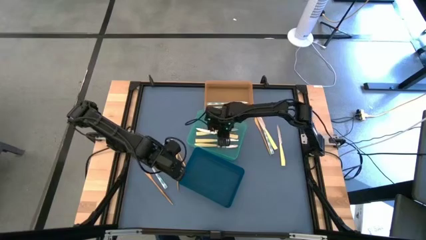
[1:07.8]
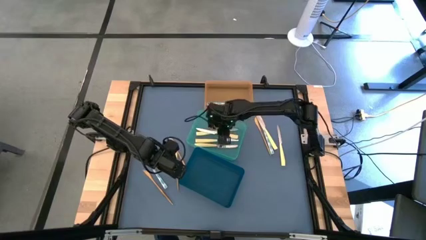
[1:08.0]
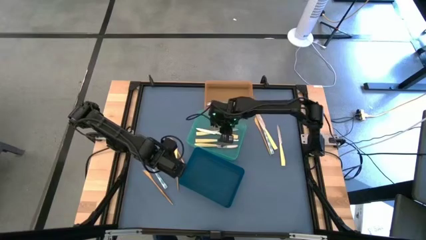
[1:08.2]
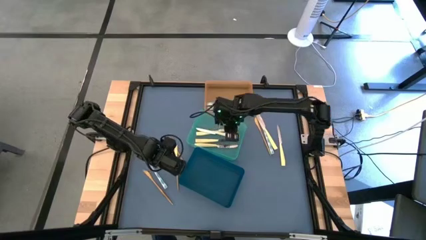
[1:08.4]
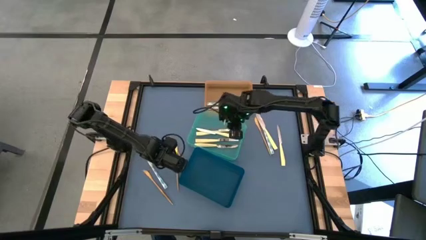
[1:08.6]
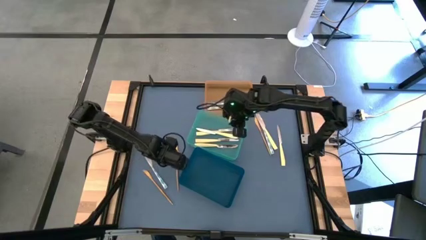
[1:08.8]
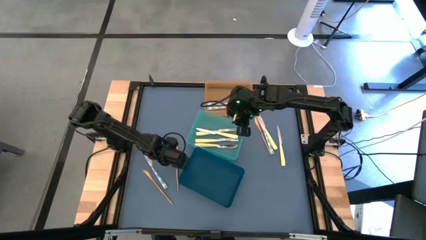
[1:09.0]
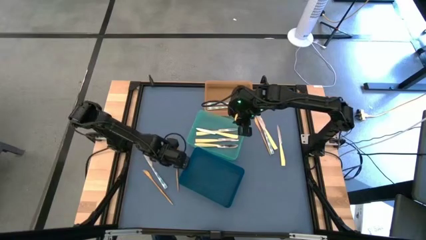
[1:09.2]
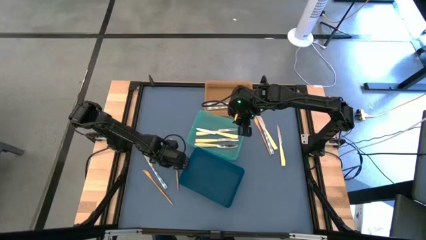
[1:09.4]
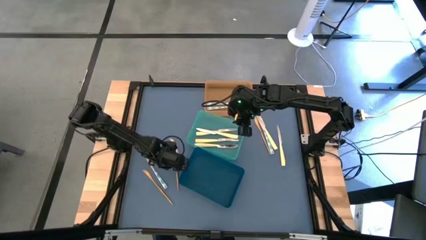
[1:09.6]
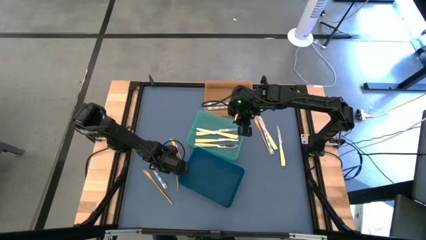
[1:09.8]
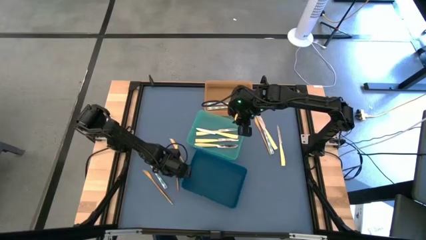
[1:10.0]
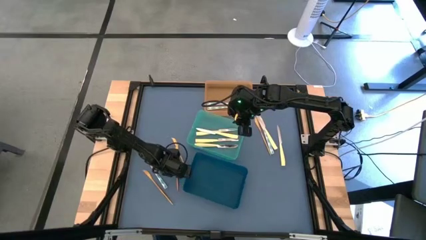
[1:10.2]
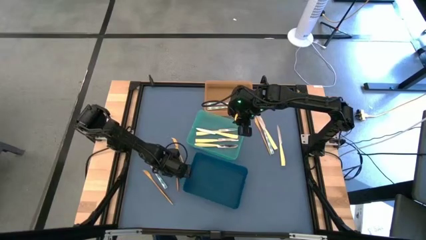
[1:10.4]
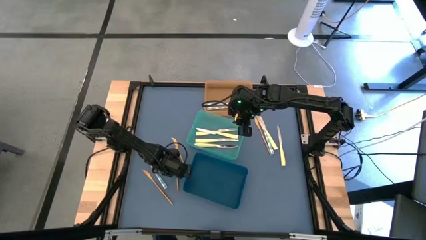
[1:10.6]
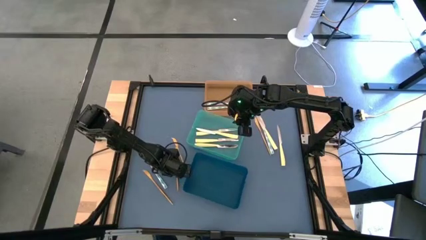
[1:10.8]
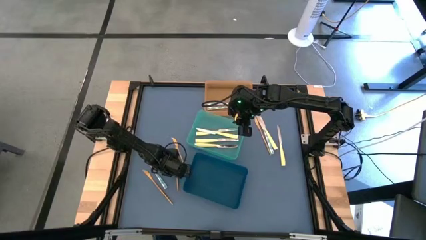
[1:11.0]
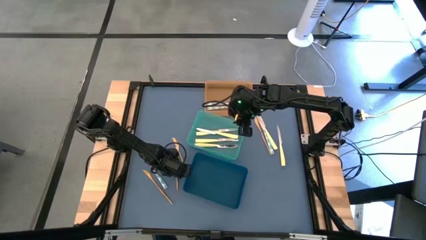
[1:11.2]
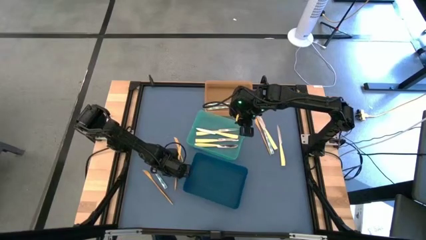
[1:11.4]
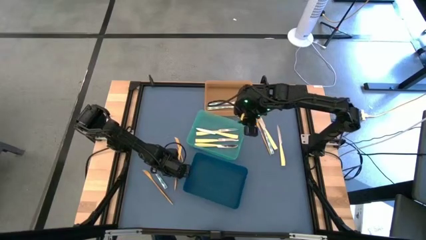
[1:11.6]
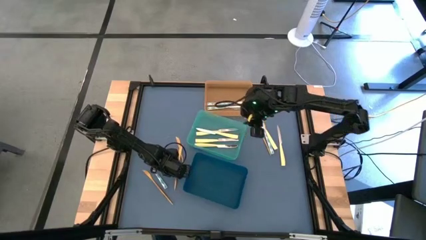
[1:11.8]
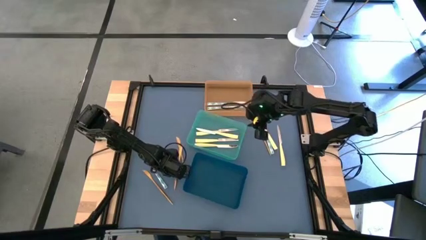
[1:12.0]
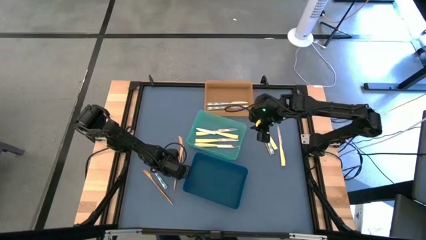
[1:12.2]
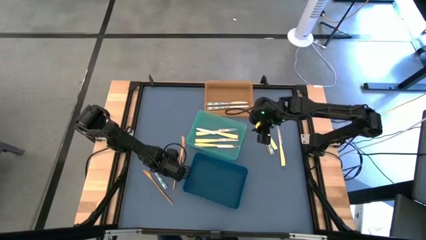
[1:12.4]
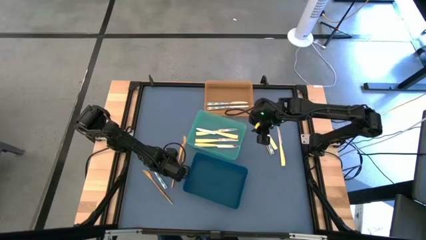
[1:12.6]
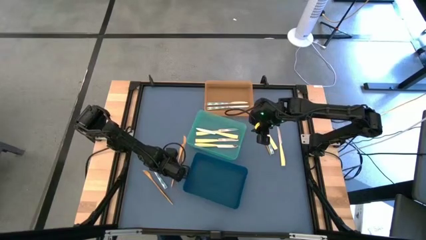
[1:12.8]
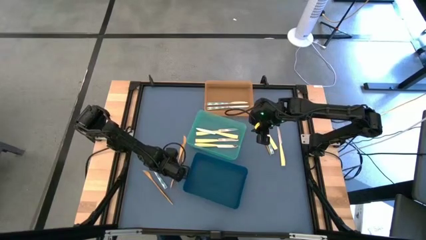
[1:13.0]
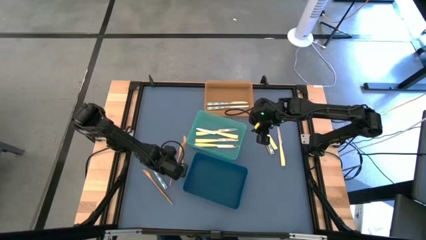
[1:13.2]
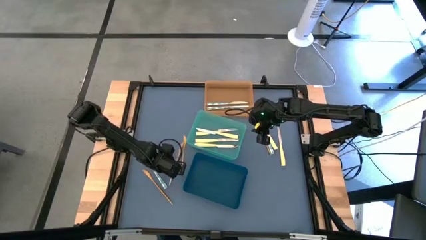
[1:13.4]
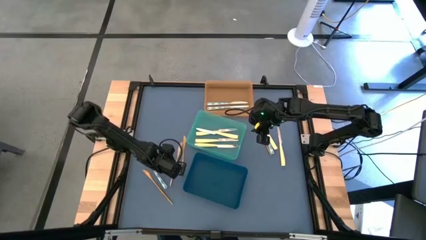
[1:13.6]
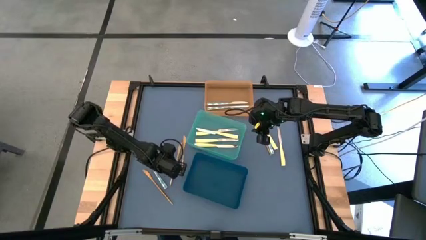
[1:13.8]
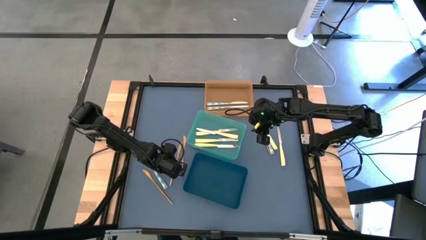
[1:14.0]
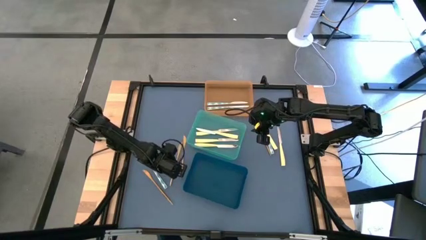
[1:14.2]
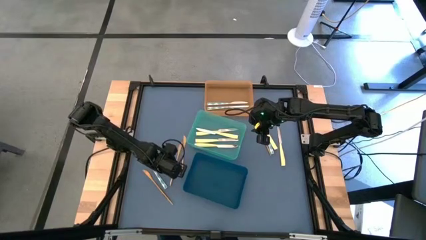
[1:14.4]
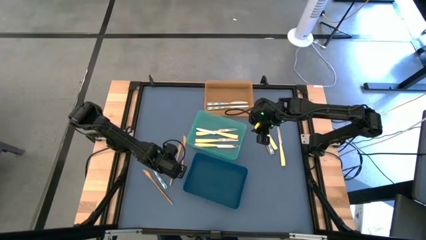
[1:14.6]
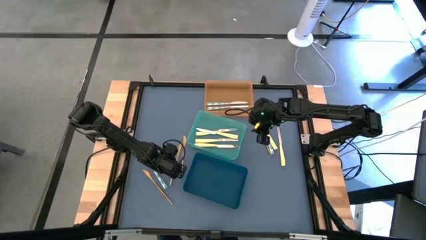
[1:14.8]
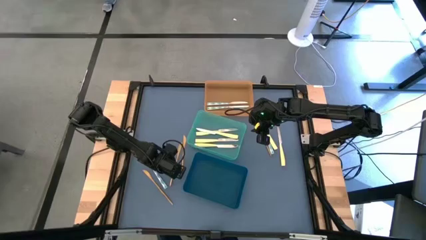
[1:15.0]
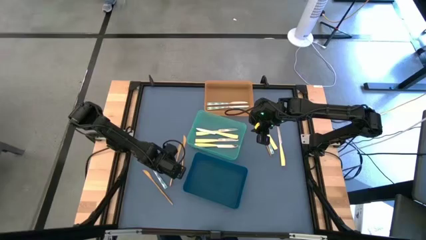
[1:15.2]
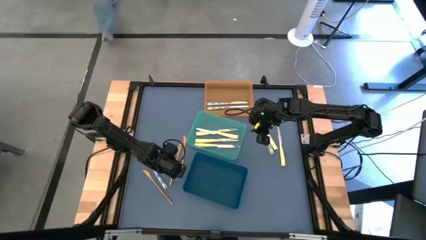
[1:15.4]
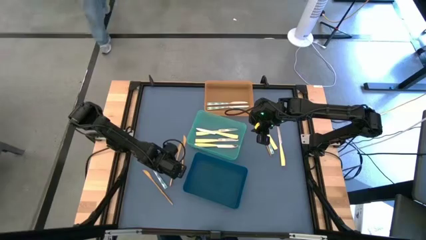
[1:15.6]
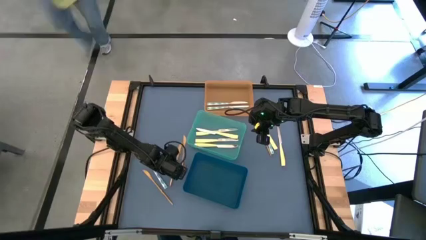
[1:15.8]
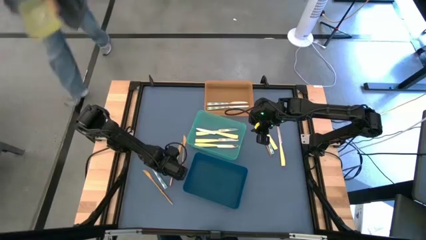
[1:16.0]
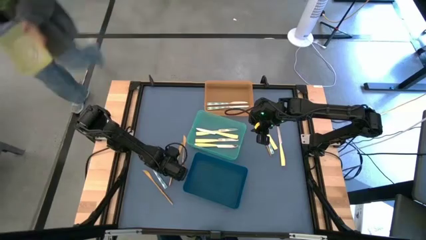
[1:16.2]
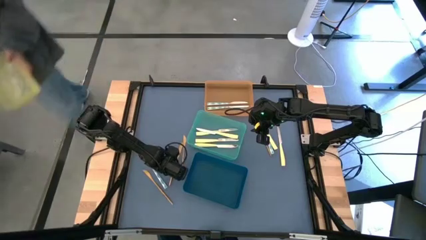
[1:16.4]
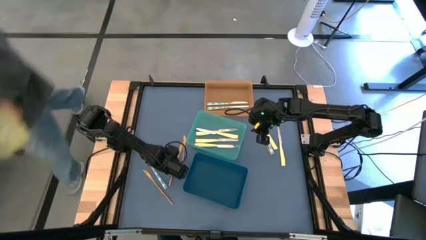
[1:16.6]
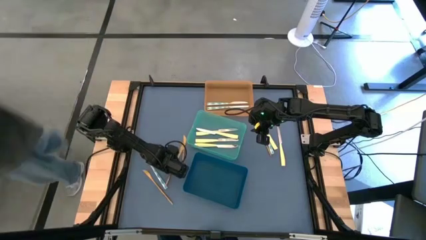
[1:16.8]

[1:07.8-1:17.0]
Task: Sort silverware by color (type)
Put the golden knife into the blue bin

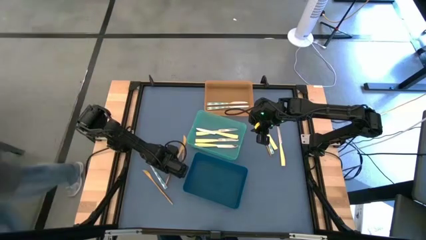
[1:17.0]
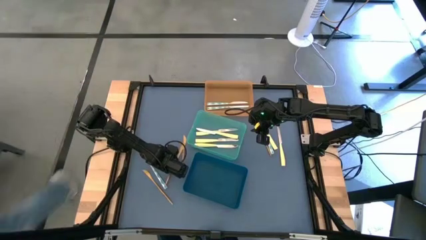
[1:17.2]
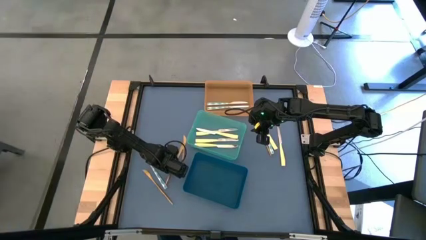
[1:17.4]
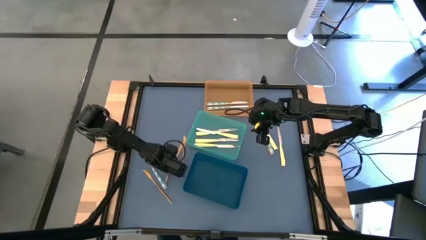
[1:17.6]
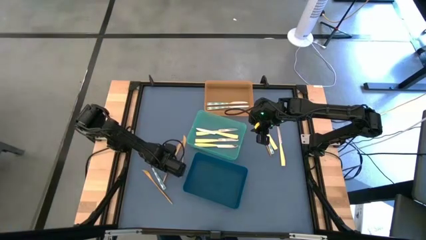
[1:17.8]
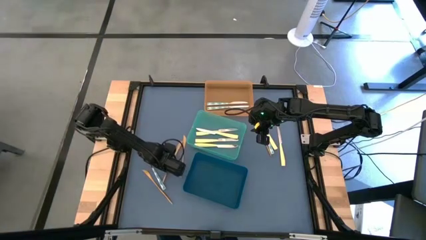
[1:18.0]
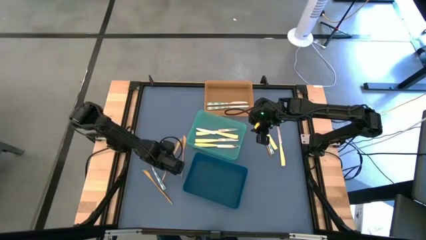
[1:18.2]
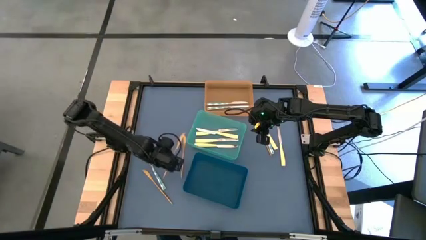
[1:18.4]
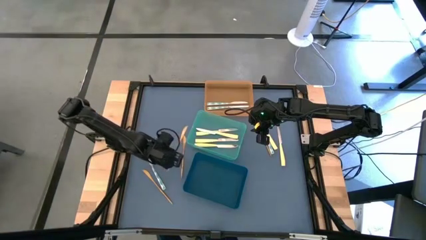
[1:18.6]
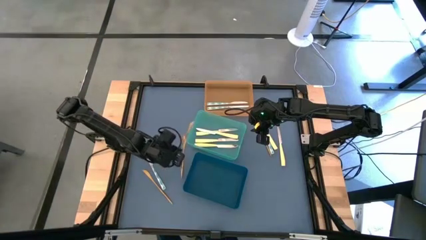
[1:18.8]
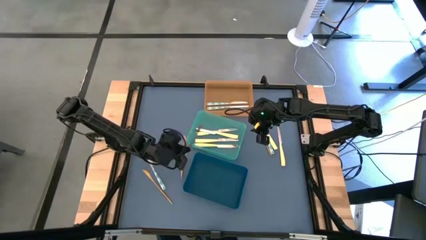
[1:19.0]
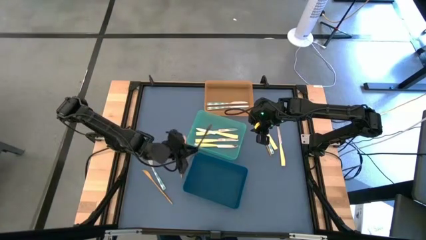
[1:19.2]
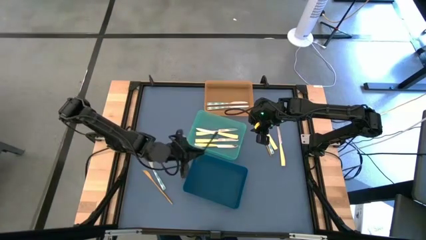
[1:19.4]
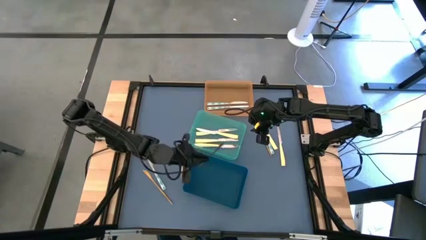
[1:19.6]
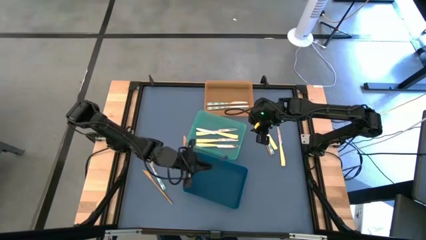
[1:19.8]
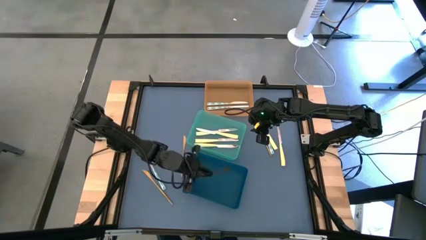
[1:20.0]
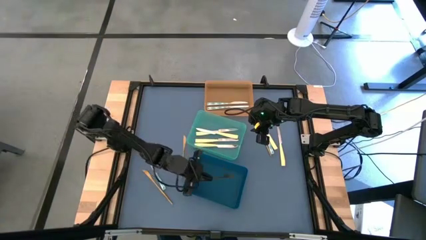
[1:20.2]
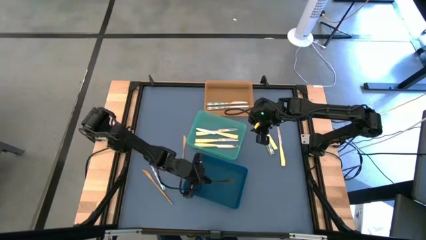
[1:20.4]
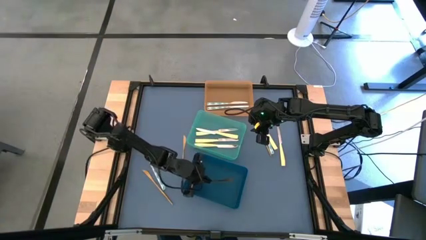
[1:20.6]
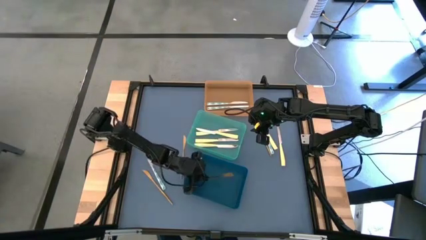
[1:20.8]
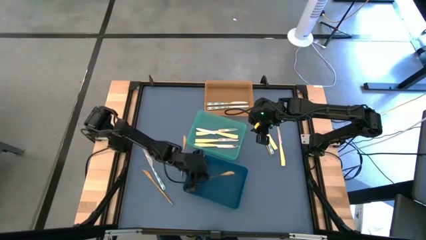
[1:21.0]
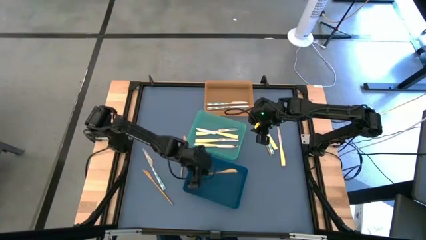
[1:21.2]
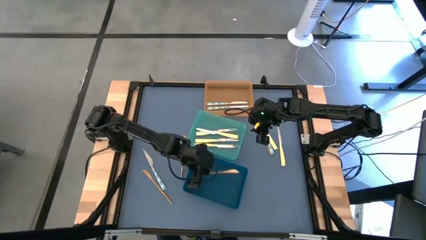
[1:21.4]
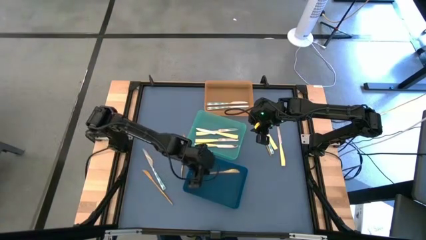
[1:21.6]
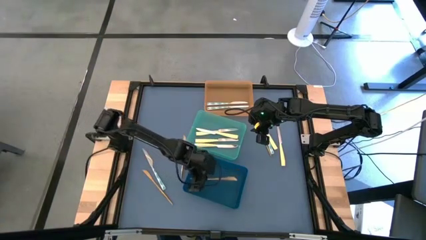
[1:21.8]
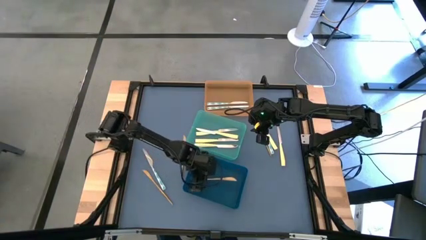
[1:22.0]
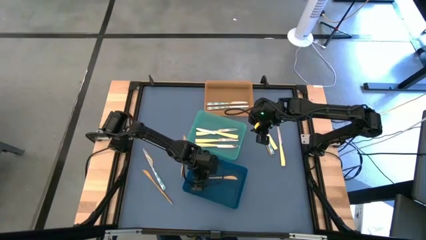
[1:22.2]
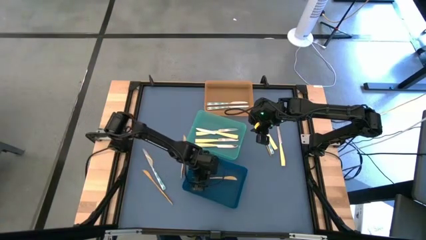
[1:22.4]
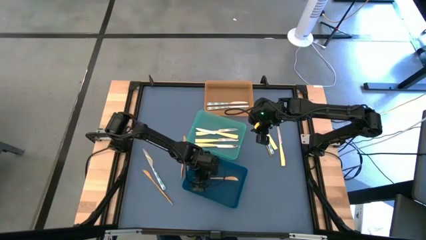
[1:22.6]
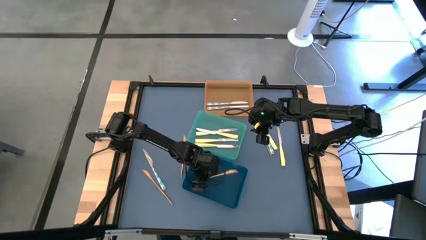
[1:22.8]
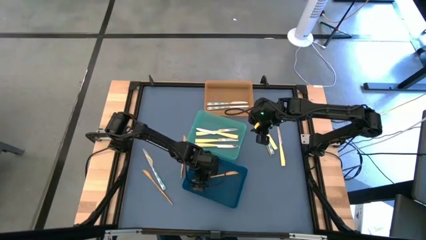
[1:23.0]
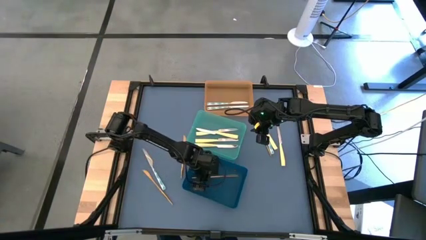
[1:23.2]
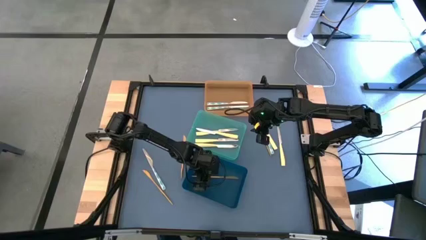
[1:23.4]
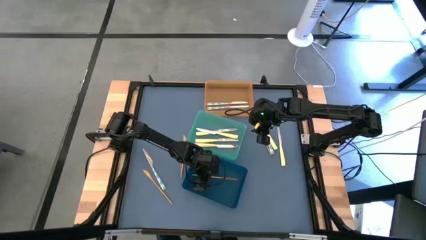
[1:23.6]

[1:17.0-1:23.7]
Put the golden knife into the blue bin
